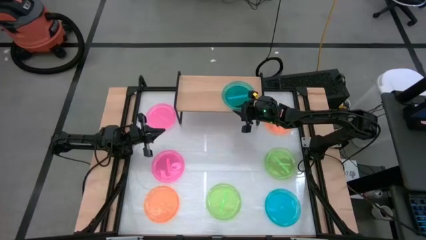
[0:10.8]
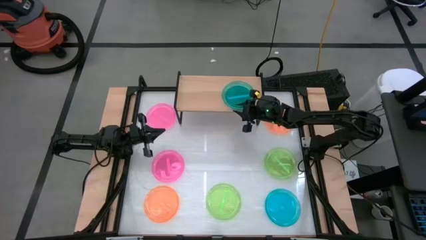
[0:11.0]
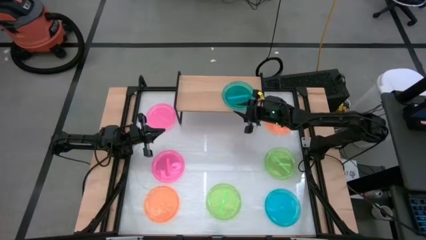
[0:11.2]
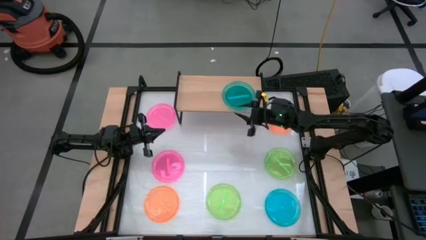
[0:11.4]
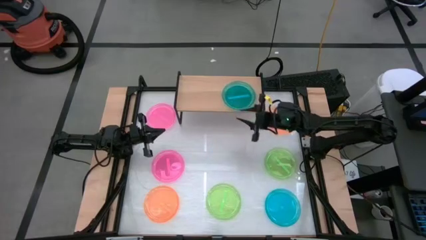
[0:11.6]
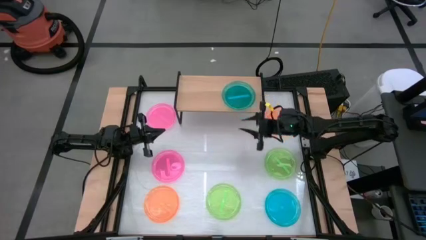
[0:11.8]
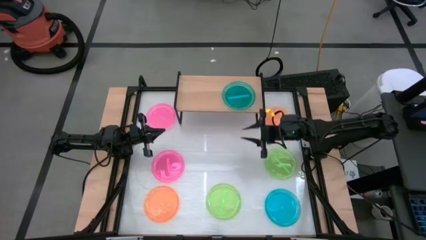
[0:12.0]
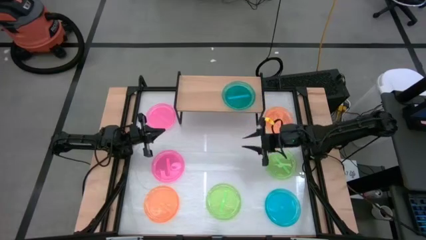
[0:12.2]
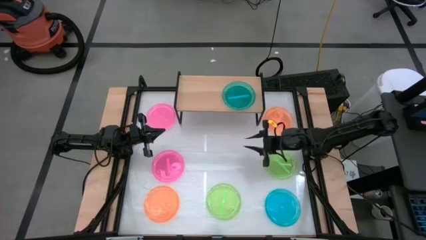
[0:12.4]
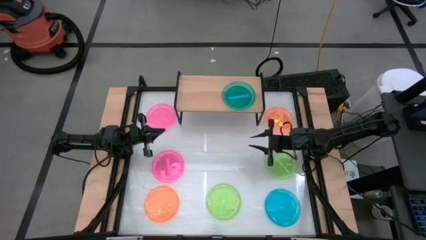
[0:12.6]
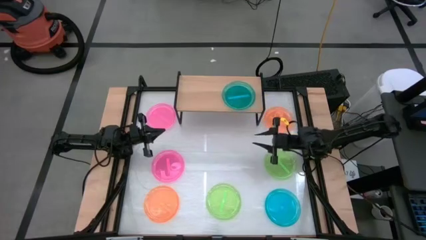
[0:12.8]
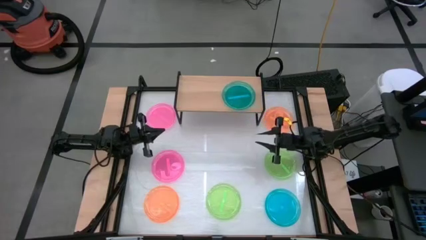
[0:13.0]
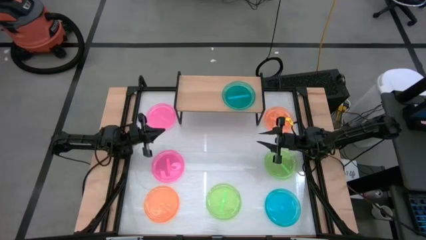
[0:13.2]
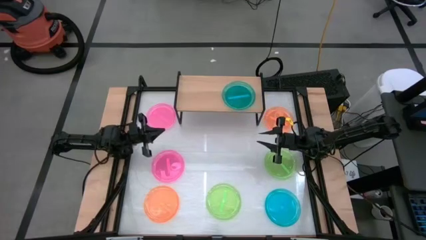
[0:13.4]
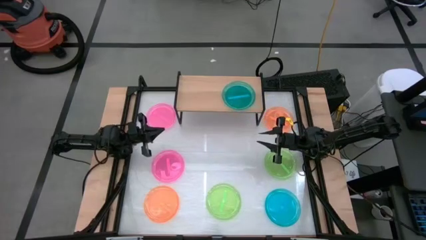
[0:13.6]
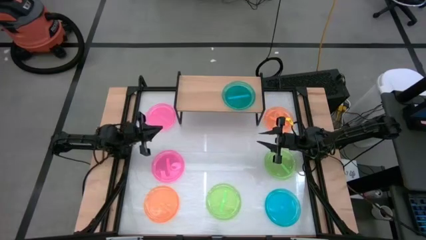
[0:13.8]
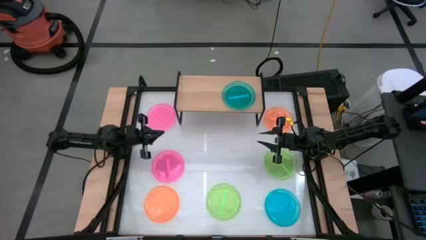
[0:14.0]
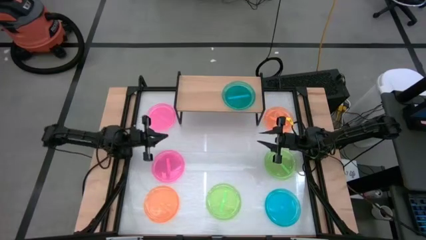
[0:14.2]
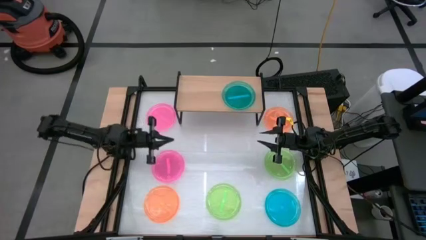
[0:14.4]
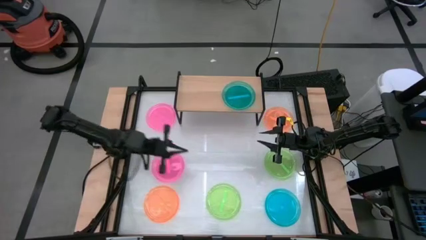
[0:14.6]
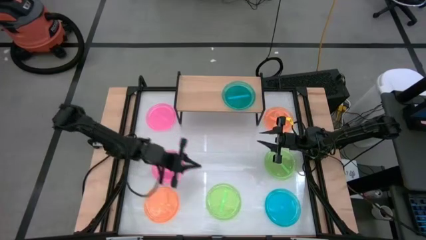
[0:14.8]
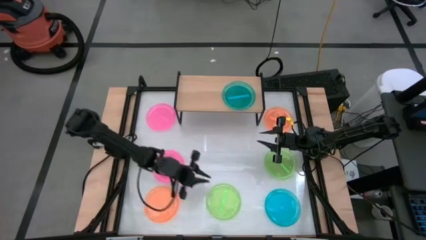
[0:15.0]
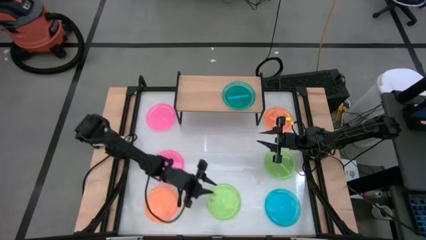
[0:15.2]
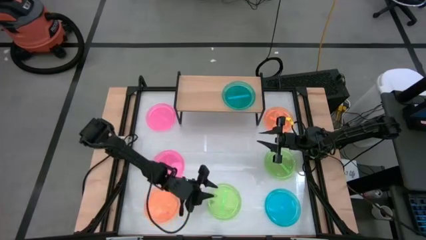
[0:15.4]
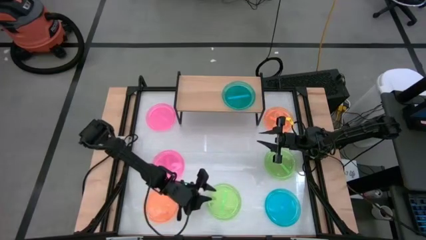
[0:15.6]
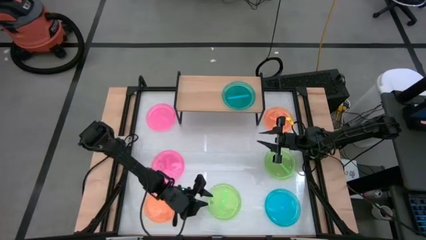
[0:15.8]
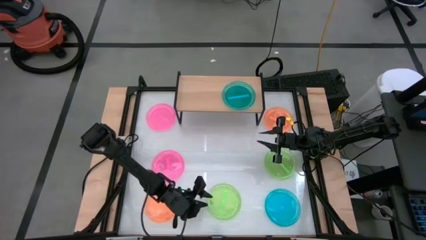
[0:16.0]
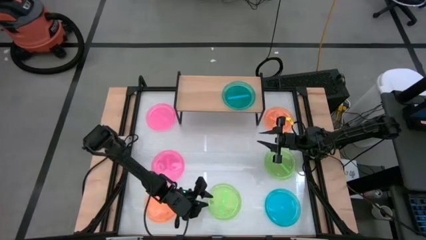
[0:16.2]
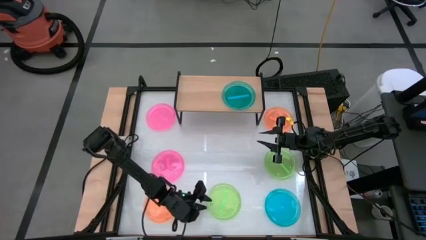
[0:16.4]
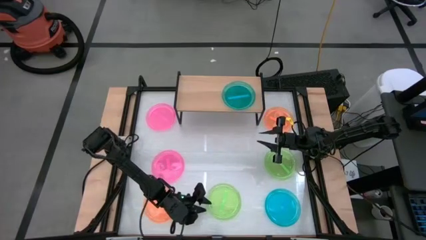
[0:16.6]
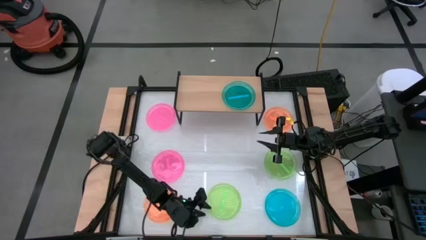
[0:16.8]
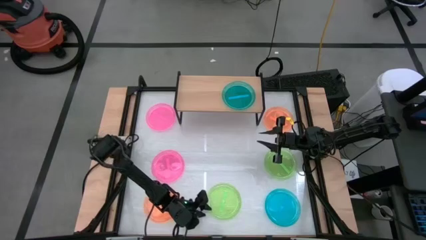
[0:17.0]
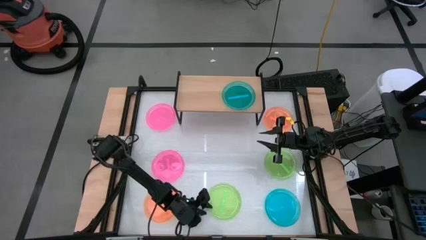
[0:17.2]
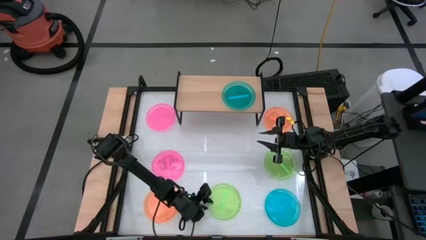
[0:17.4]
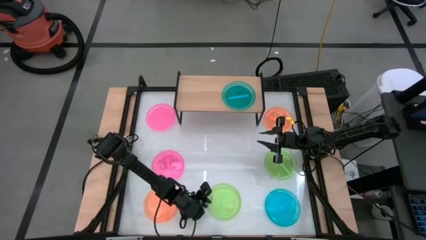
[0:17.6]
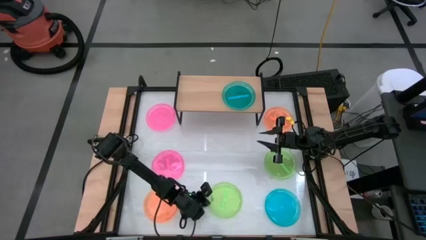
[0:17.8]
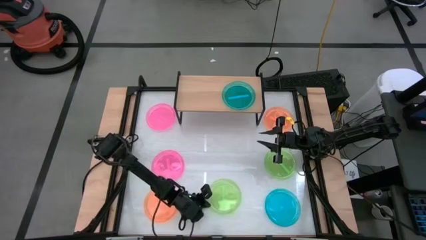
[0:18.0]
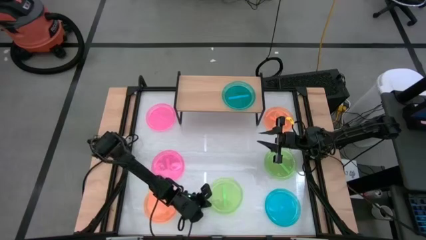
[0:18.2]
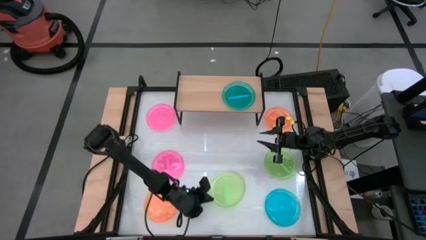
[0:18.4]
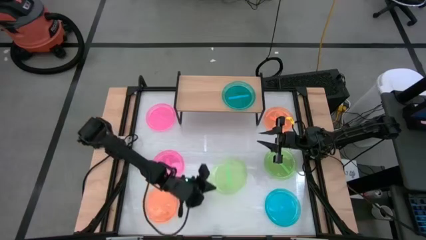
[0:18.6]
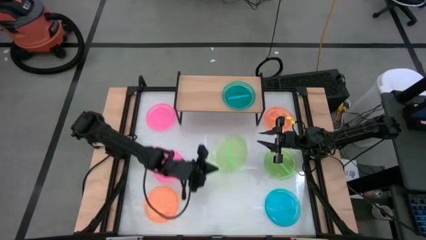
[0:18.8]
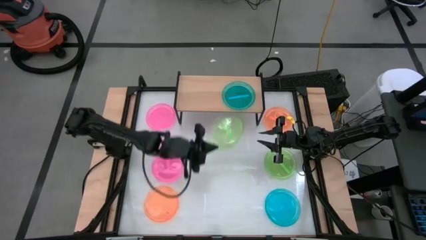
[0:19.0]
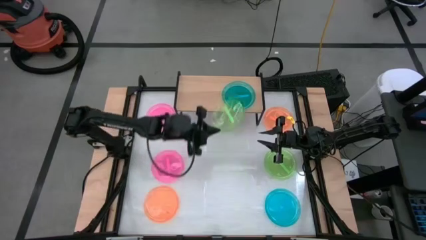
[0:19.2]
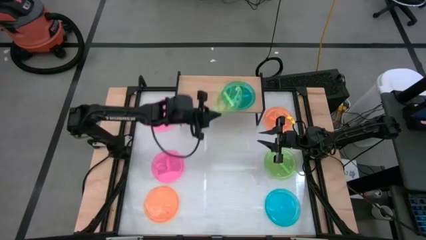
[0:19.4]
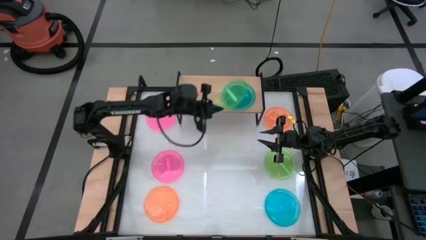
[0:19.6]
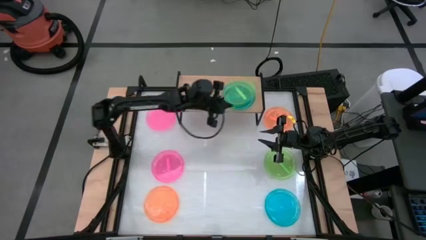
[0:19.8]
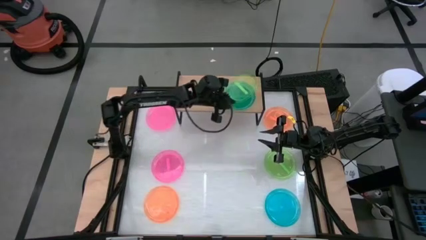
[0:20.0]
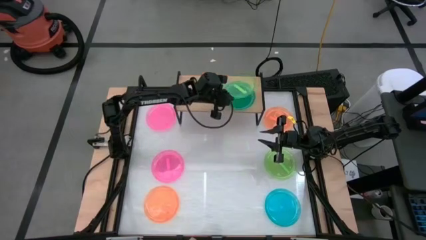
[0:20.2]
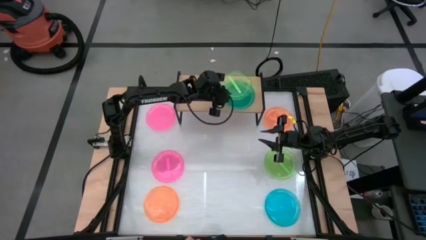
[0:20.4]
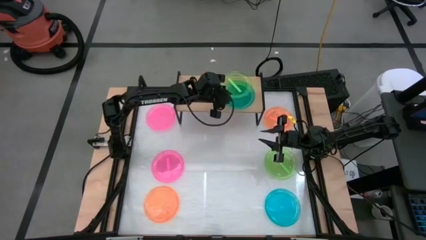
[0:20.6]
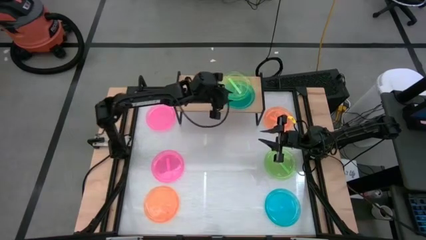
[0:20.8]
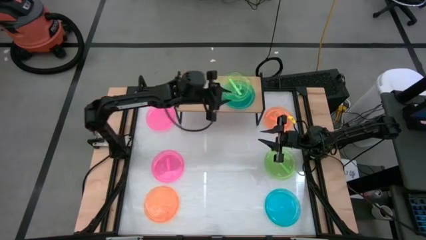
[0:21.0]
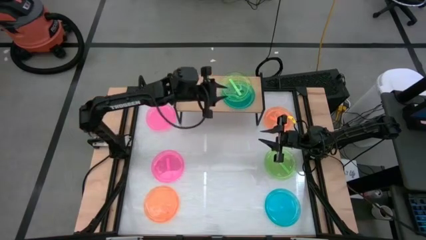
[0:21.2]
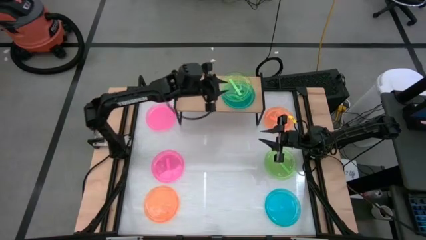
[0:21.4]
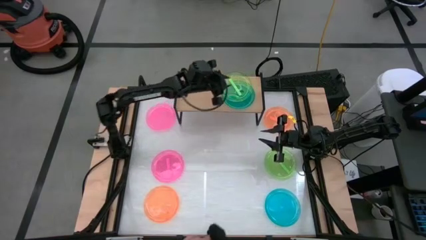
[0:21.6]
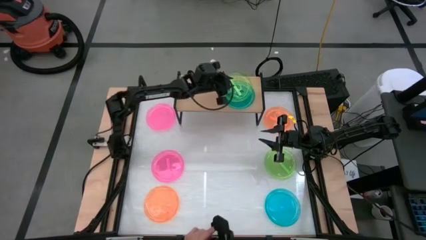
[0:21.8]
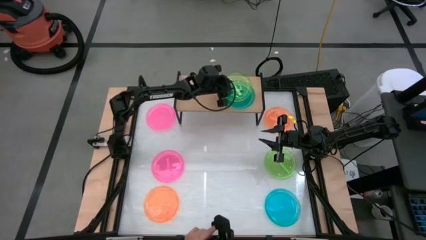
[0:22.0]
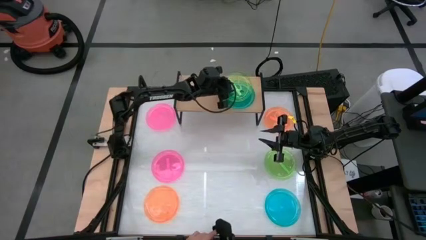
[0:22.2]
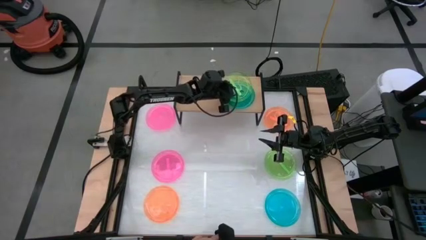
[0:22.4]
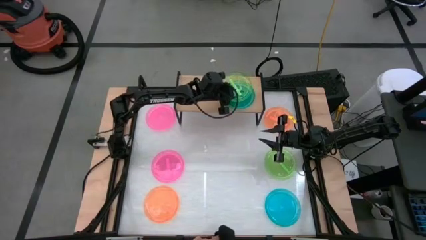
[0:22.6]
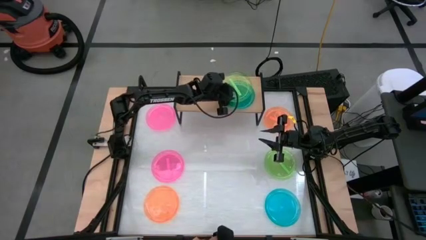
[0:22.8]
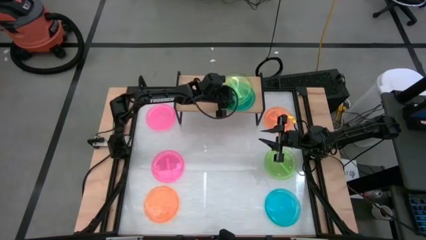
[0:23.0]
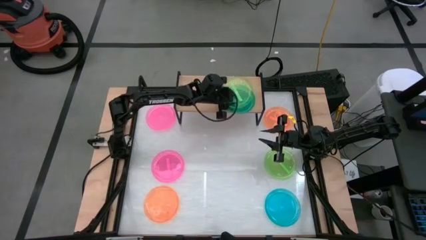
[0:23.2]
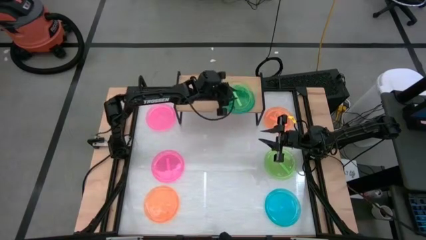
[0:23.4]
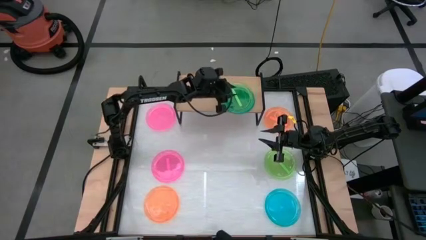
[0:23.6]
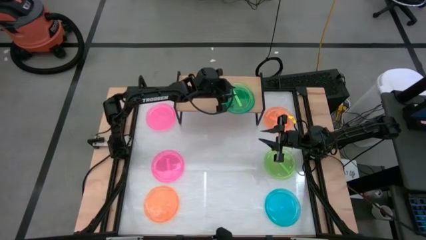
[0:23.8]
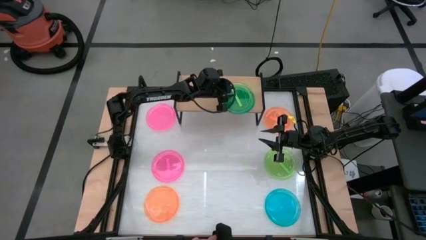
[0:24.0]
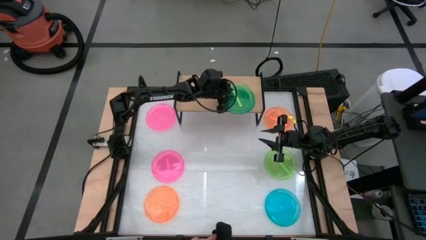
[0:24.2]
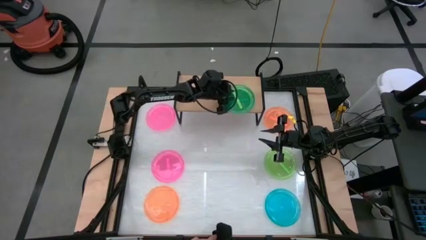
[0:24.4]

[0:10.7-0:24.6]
Task: Place and stack plates onto a shelf
Stack the bottom green plate on top of the blue plate on the shelf
